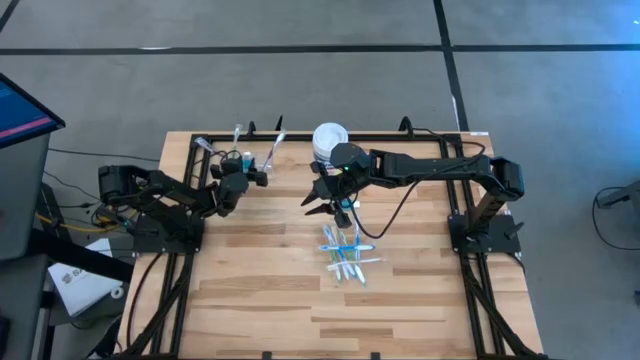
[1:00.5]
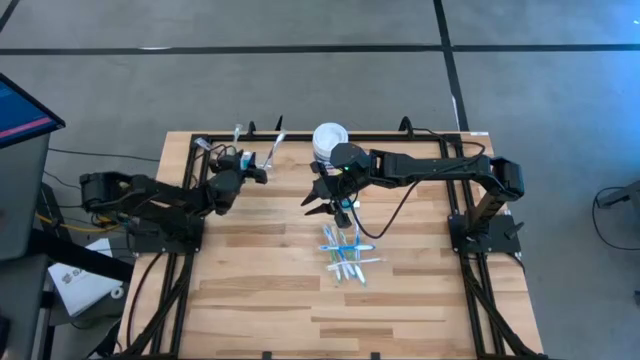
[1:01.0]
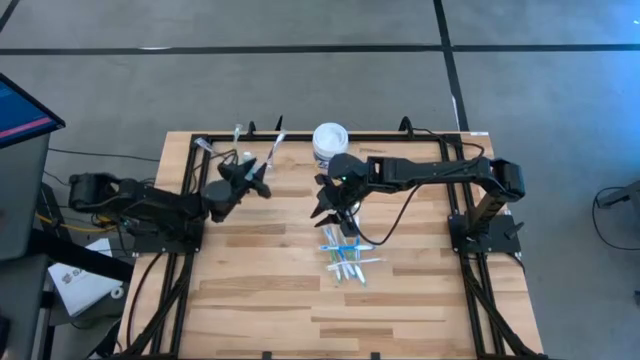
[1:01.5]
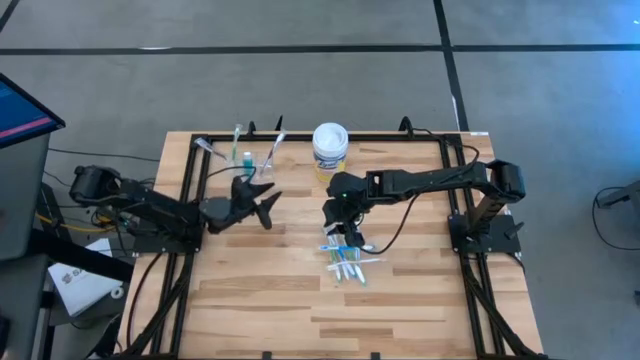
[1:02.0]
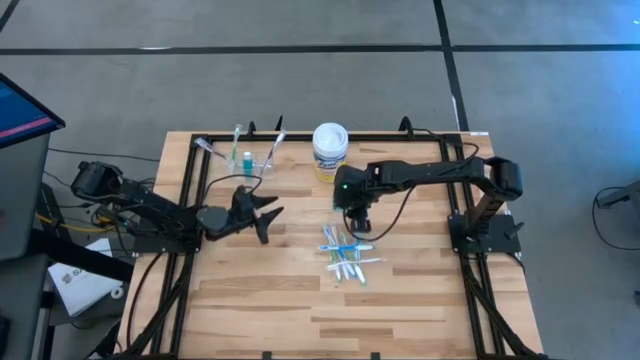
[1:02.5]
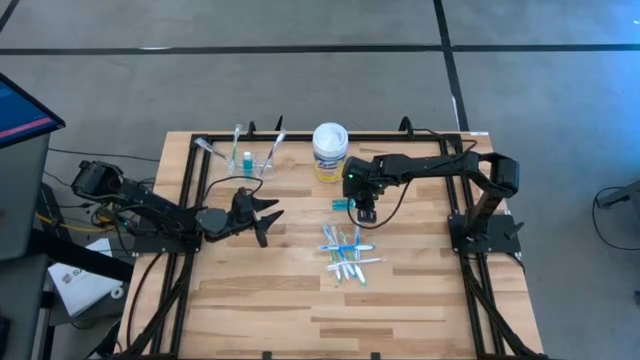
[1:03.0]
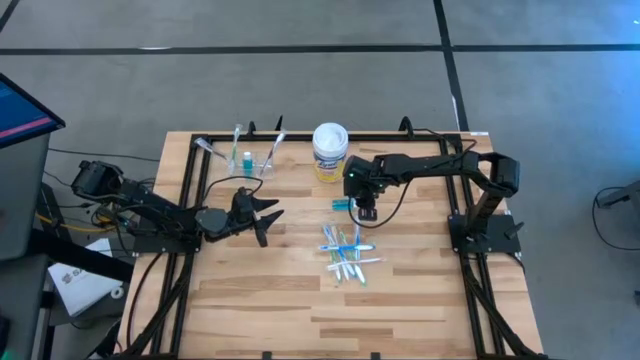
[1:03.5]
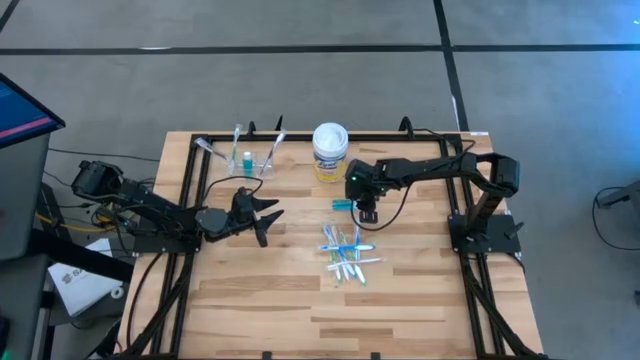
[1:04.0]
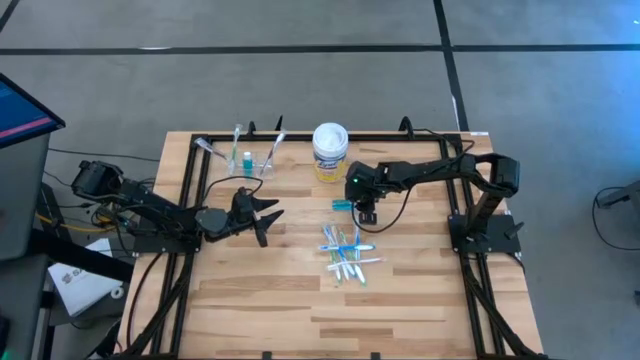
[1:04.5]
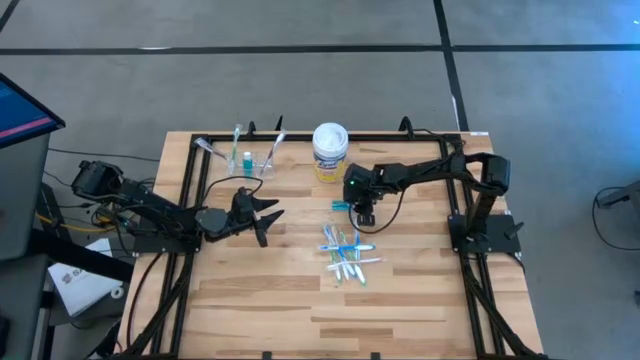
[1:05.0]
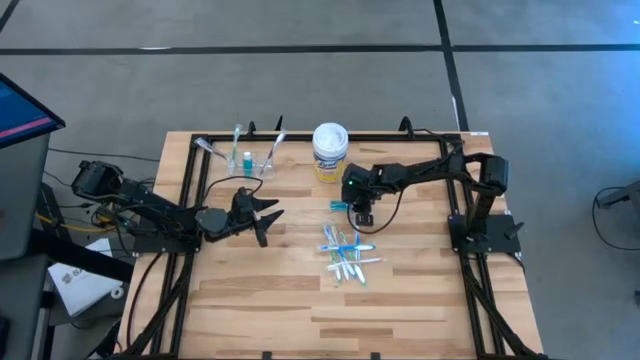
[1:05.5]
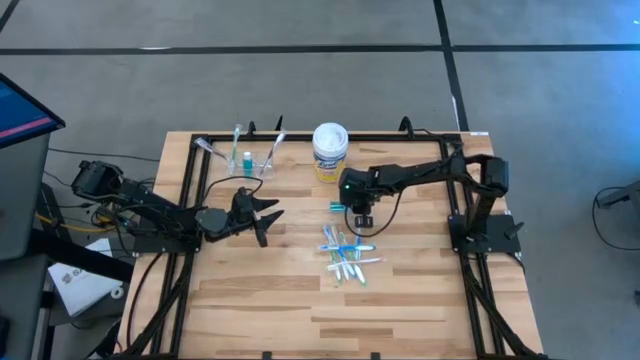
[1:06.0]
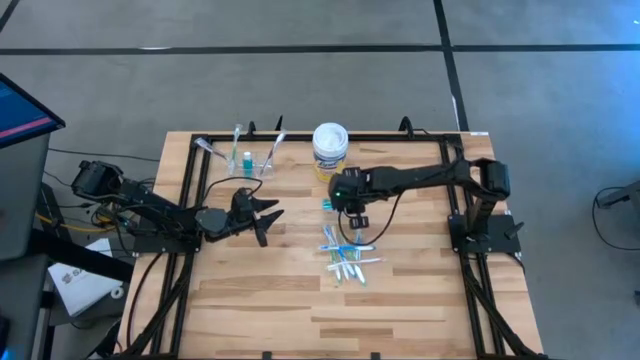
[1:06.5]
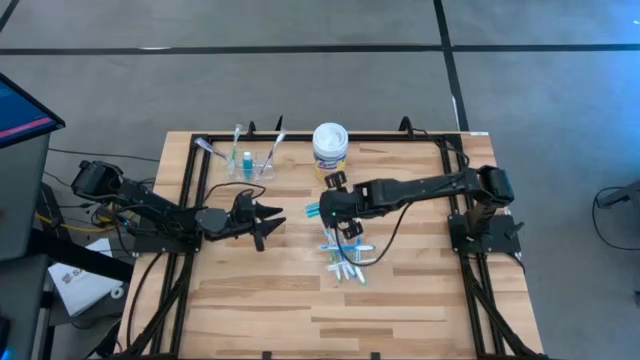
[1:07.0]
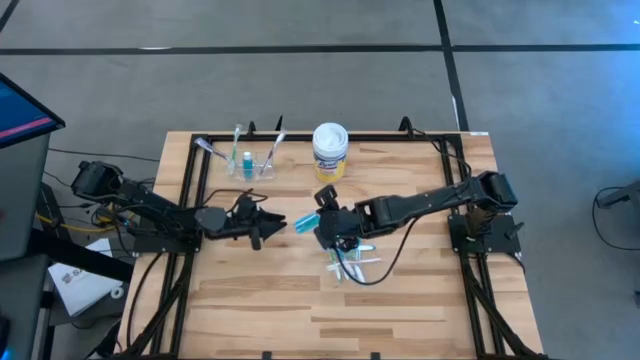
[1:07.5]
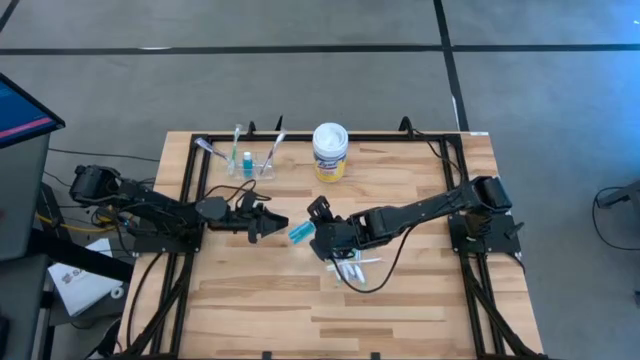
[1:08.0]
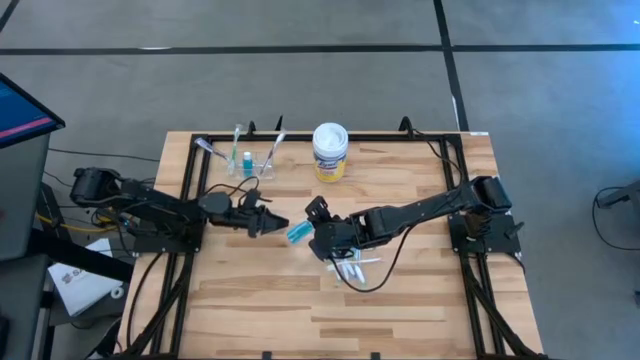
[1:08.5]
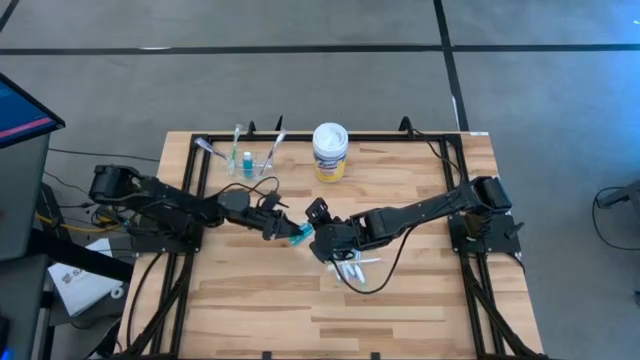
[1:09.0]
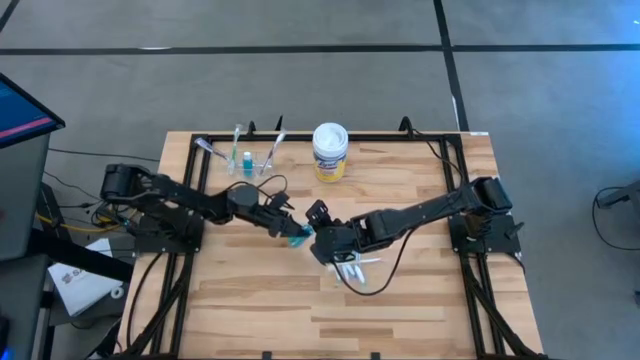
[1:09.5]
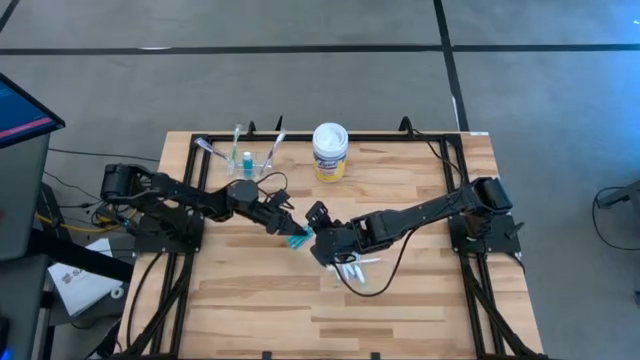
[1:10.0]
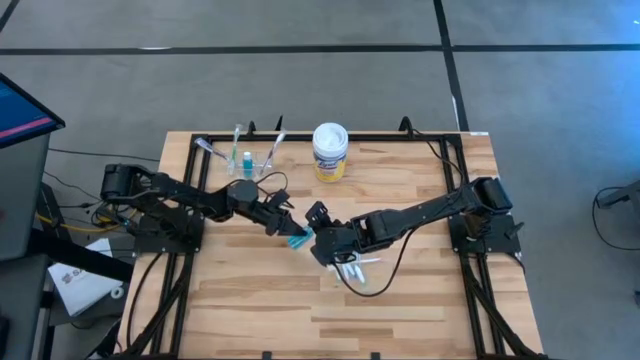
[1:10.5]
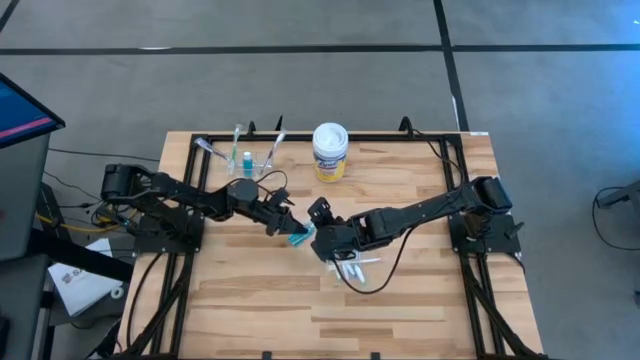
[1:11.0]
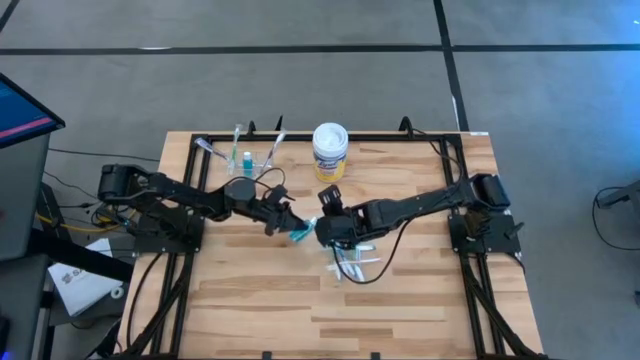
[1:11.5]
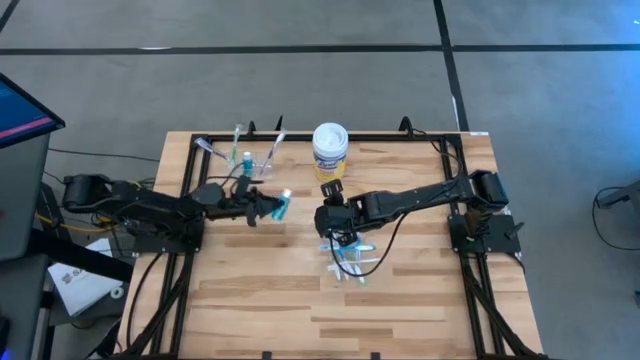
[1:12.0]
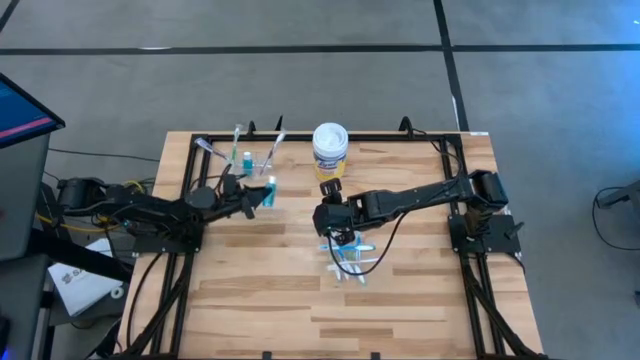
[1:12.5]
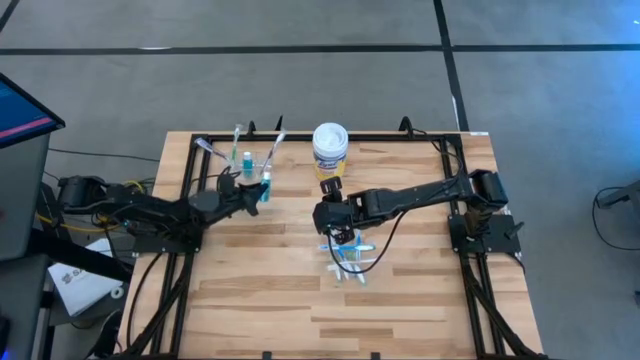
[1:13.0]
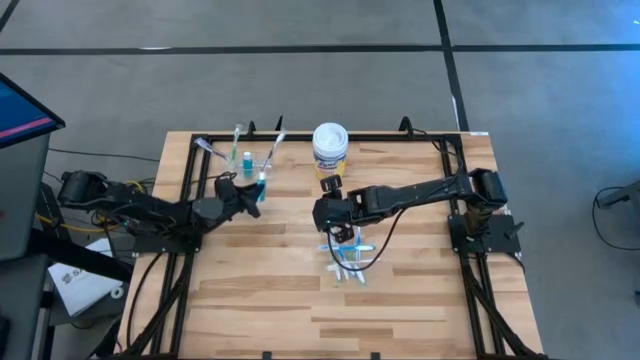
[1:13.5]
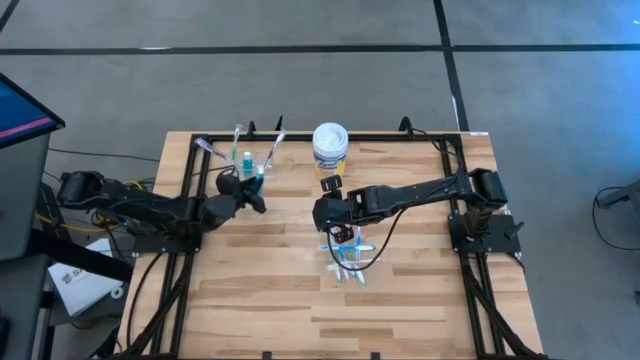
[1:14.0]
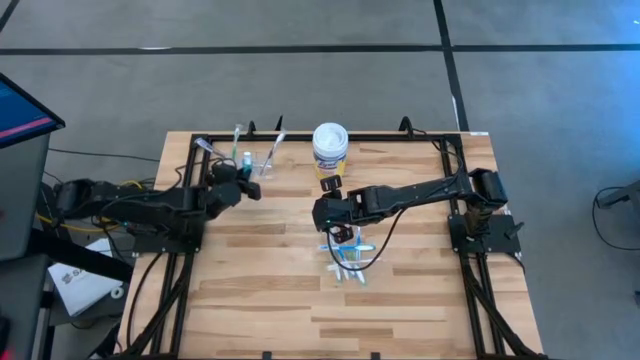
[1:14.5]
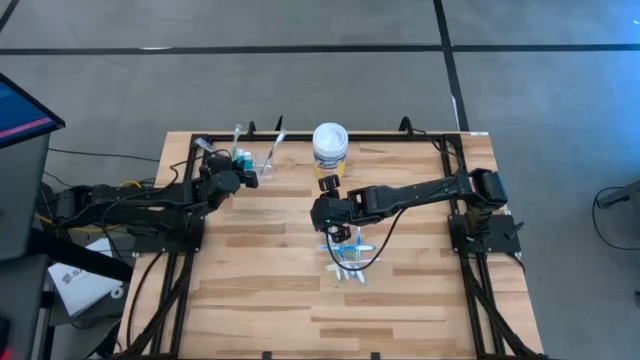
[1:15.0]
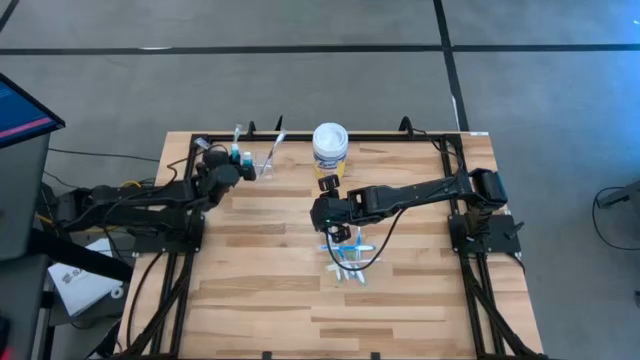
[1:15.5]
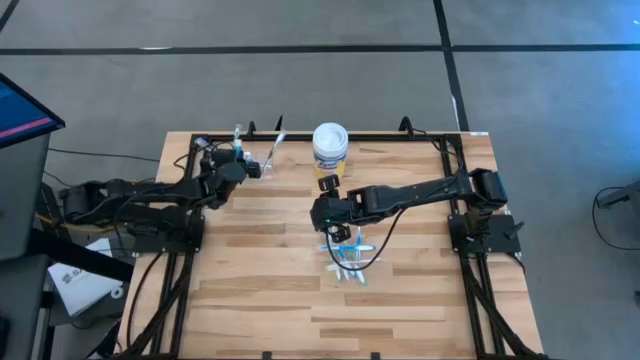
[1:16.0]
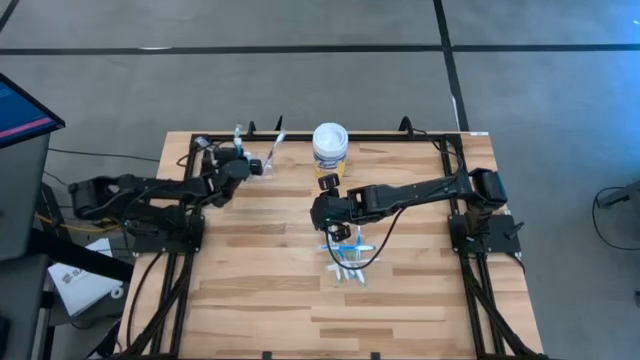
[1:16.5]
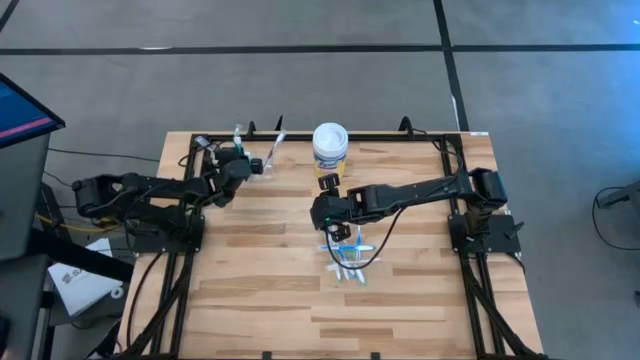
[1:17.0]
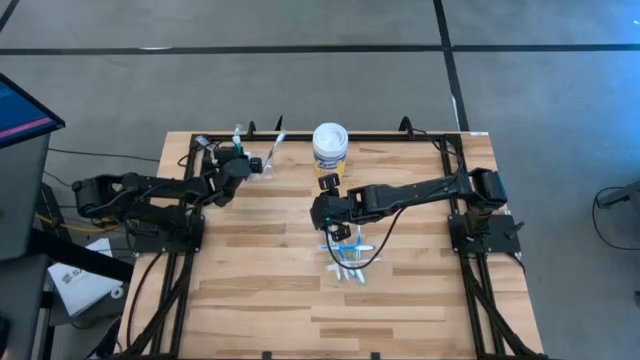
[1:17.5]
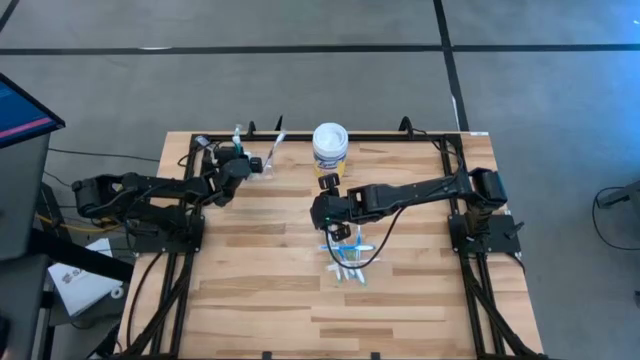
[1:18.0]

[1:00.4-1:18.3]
Task: Pick & Place toothbrushing station
Put the mouthwash into the transparent organizer

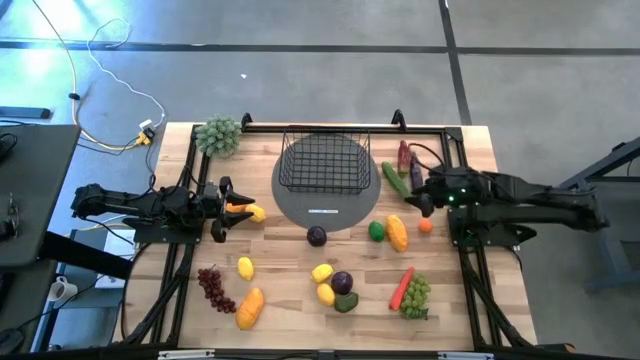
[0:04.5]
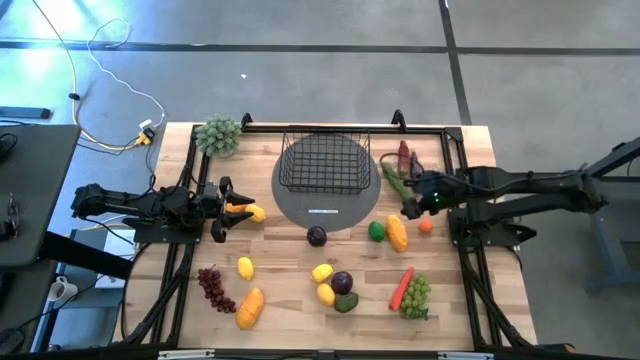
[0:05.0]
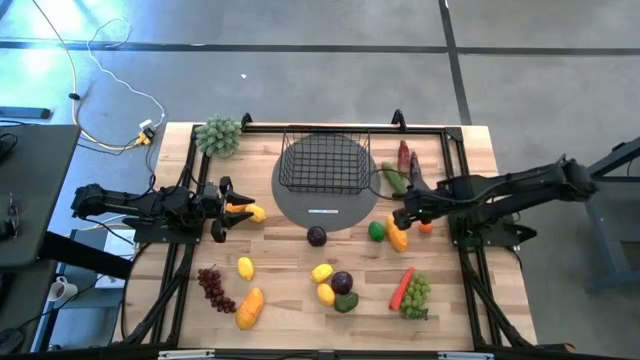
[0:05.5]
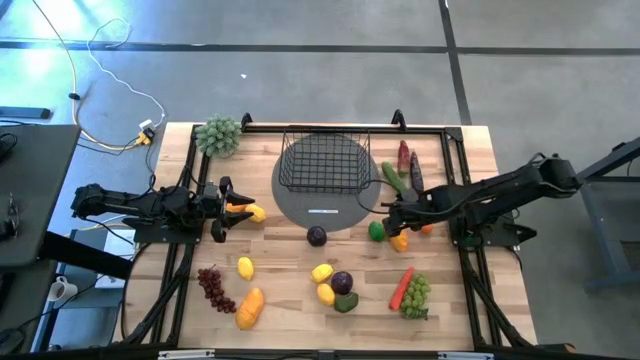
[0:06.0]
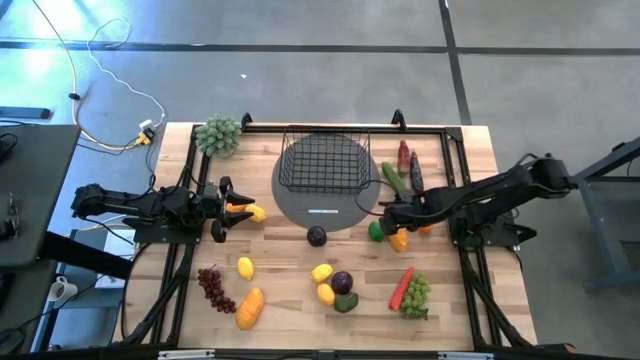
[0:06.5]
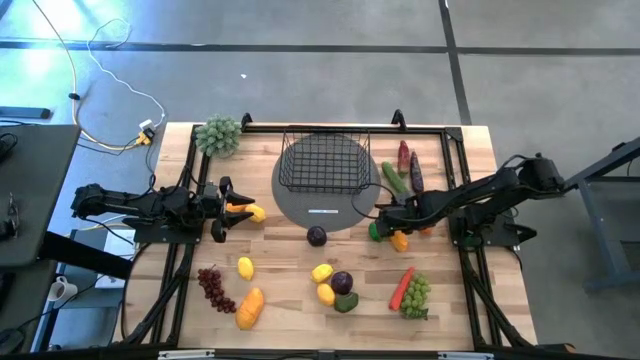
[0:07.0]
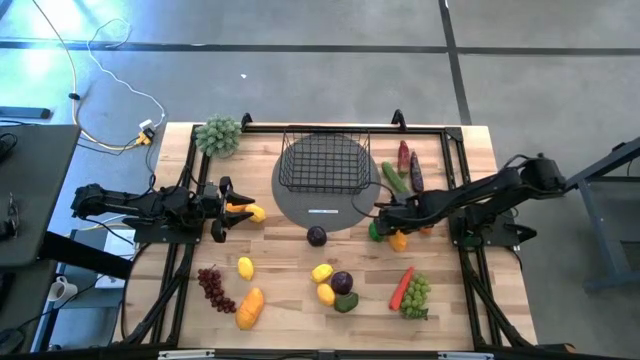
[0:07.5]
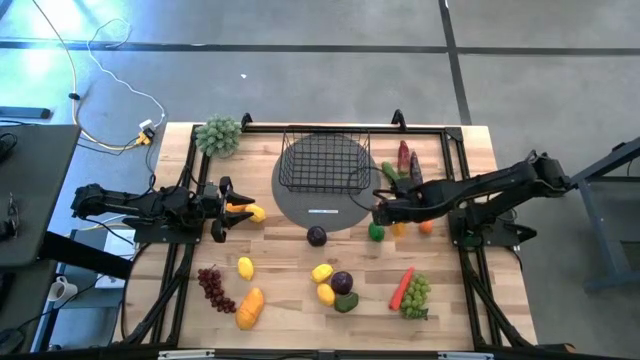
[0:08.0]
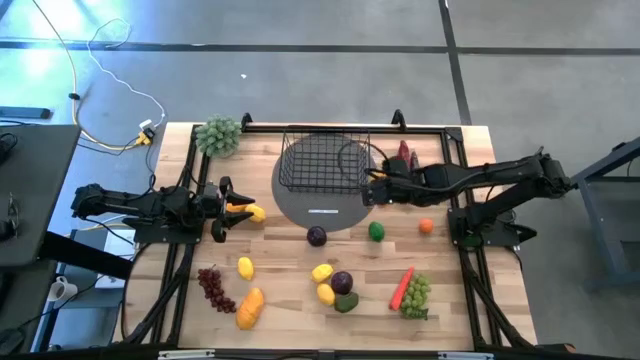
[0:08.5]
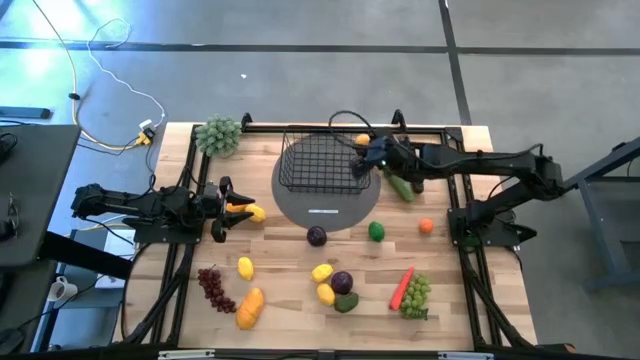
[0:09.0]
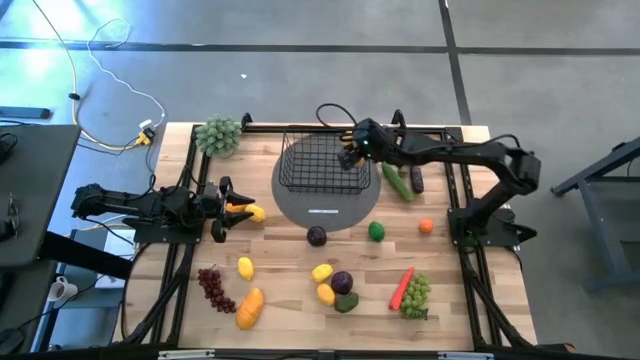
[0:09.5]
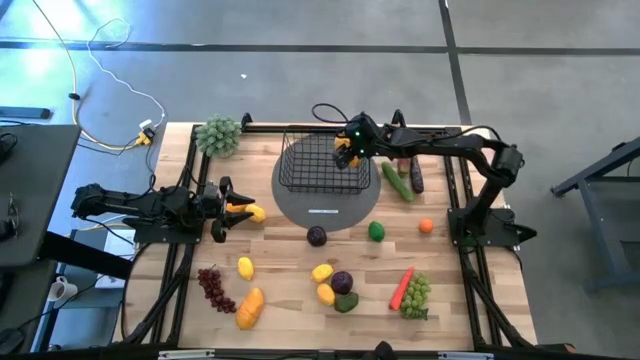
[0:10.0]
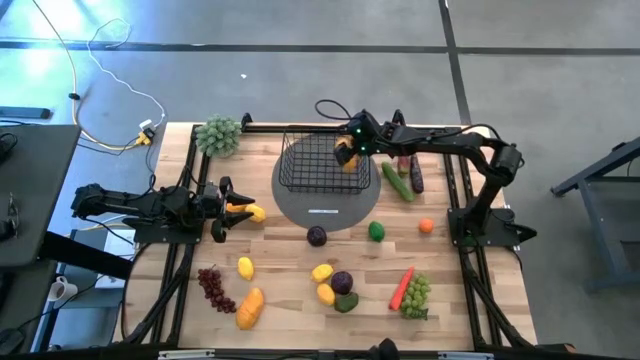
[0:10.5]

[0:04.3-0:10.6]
Task: Build produce basket
Put the yellow mango into the wire basket
